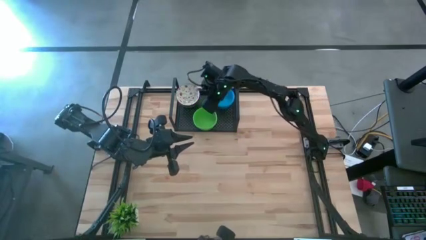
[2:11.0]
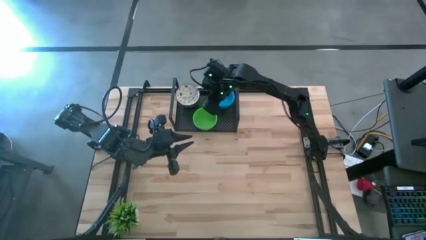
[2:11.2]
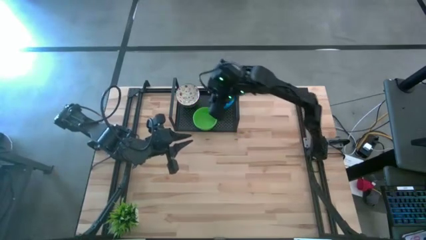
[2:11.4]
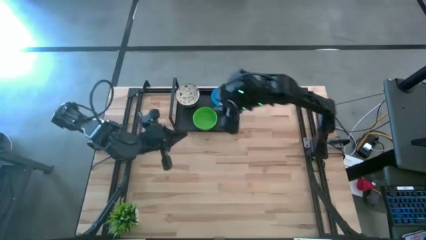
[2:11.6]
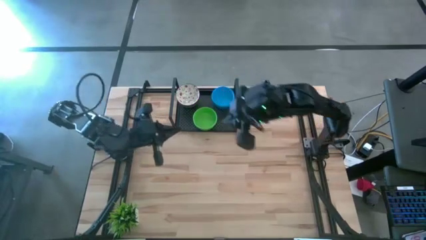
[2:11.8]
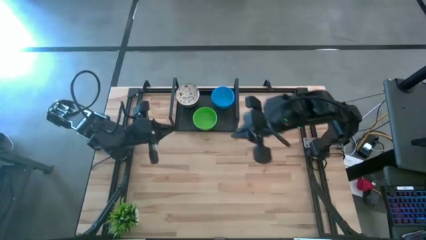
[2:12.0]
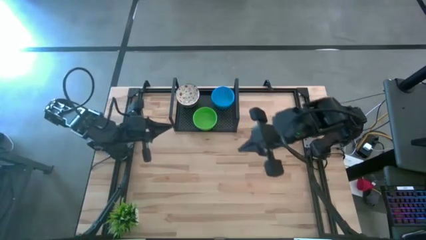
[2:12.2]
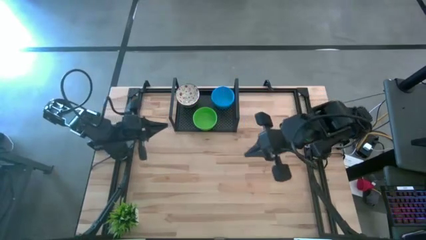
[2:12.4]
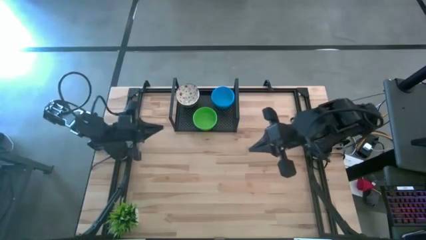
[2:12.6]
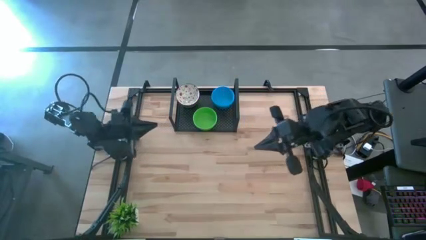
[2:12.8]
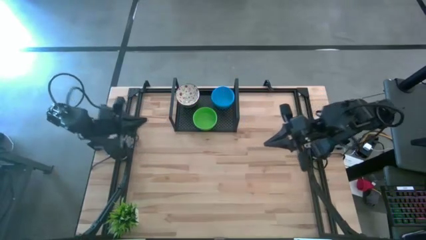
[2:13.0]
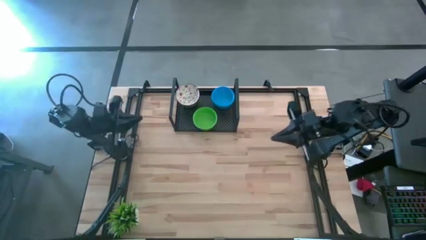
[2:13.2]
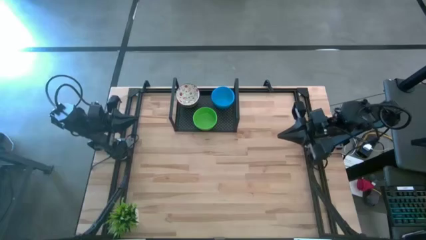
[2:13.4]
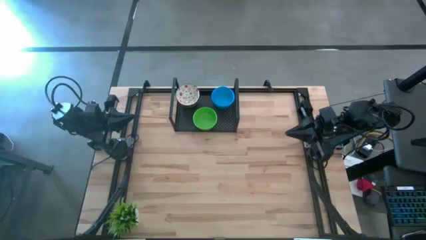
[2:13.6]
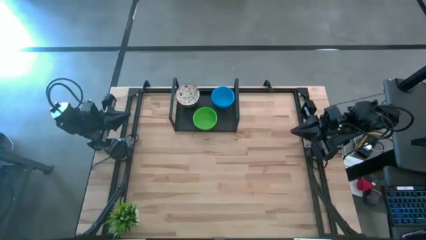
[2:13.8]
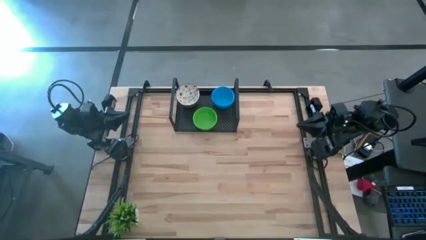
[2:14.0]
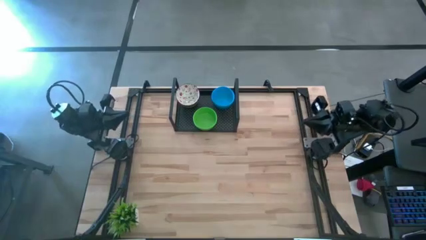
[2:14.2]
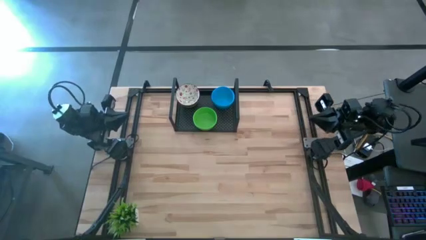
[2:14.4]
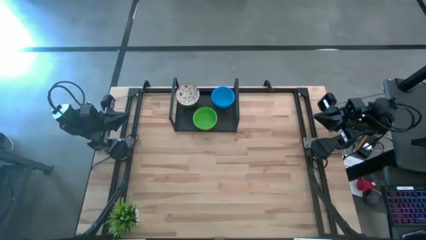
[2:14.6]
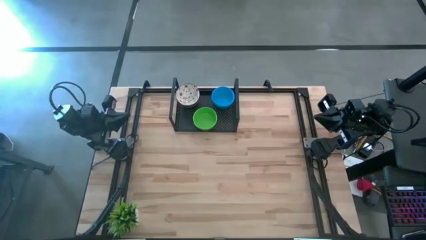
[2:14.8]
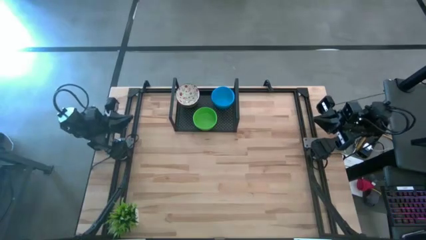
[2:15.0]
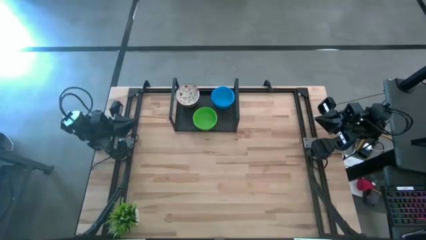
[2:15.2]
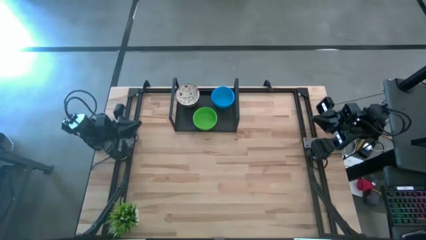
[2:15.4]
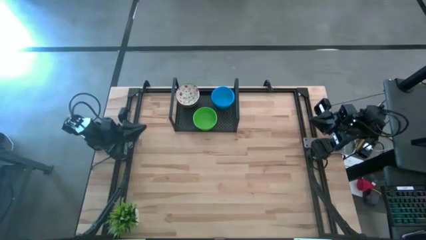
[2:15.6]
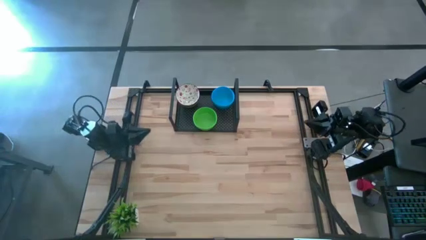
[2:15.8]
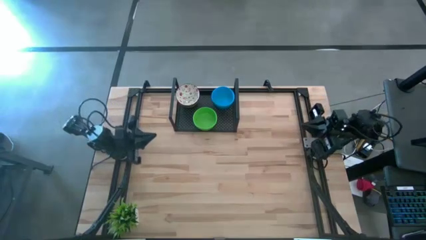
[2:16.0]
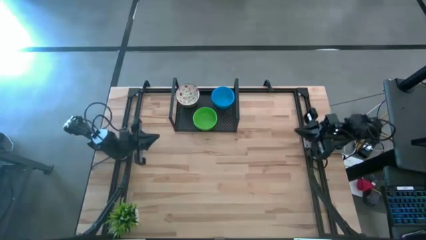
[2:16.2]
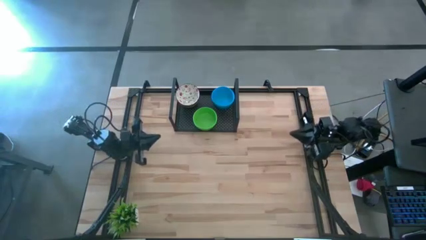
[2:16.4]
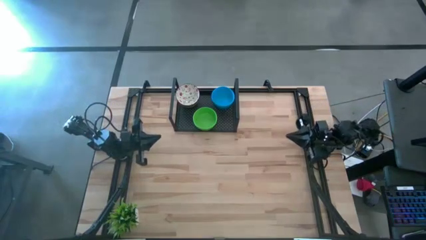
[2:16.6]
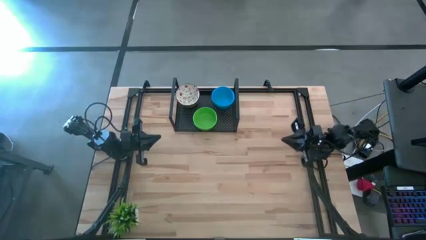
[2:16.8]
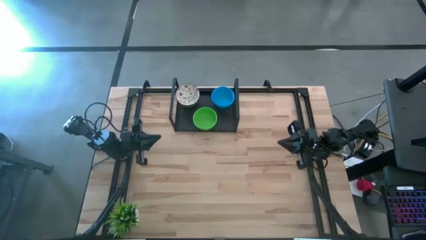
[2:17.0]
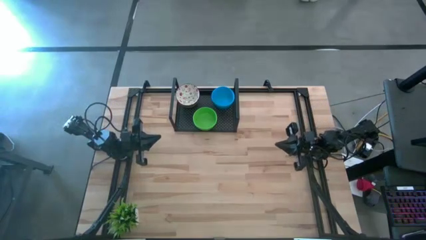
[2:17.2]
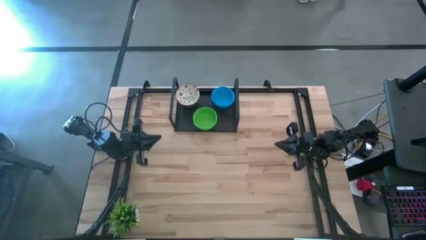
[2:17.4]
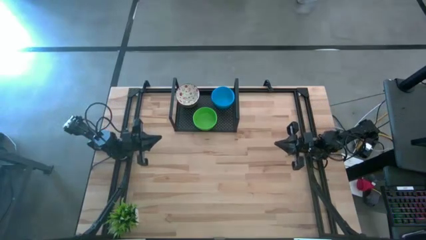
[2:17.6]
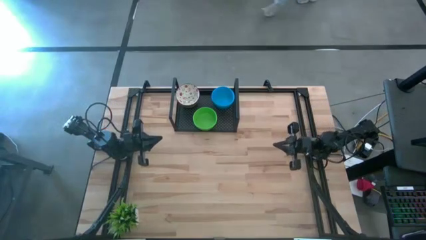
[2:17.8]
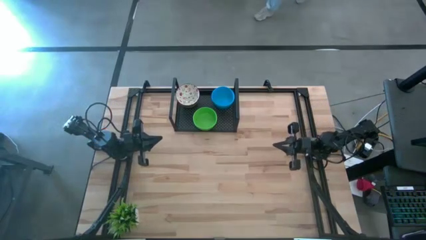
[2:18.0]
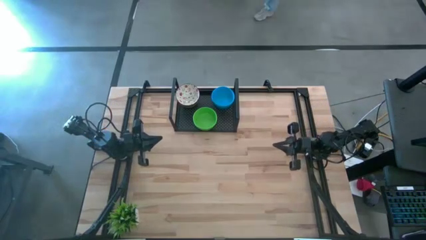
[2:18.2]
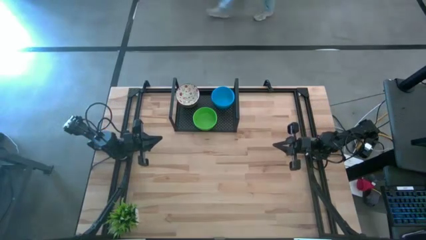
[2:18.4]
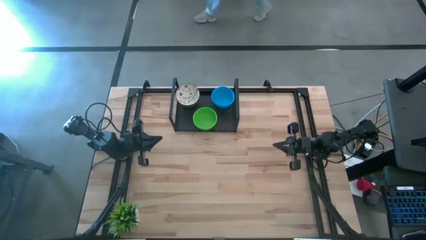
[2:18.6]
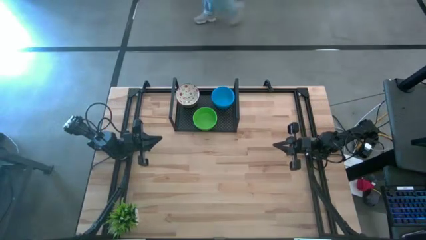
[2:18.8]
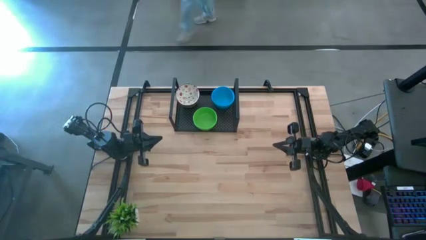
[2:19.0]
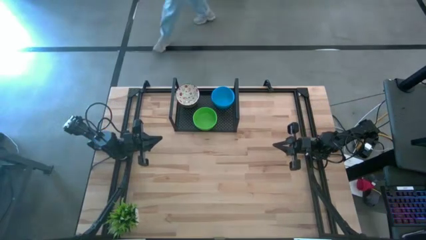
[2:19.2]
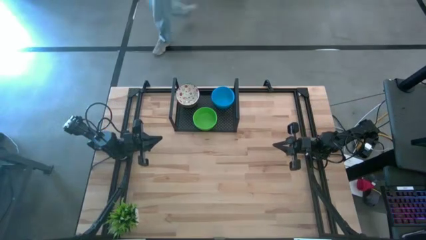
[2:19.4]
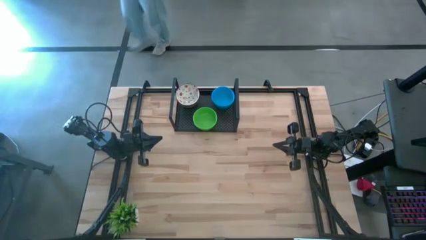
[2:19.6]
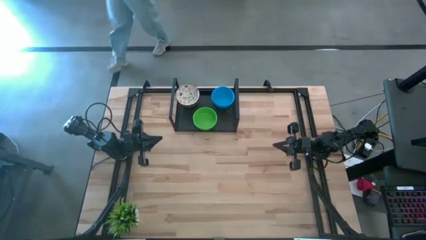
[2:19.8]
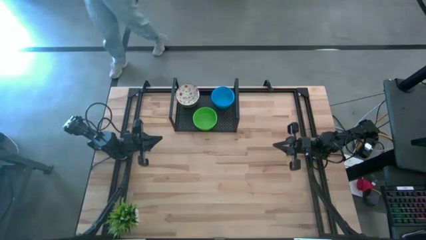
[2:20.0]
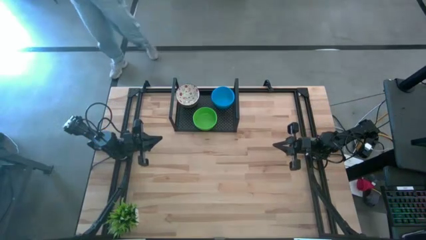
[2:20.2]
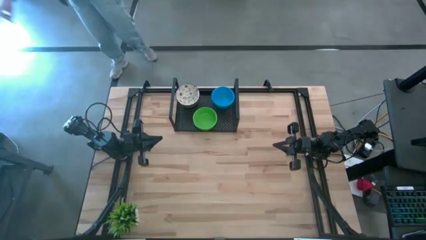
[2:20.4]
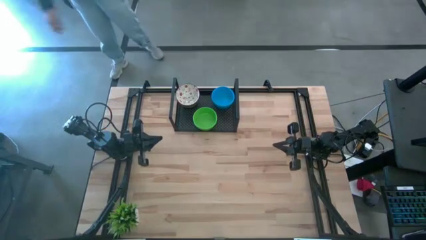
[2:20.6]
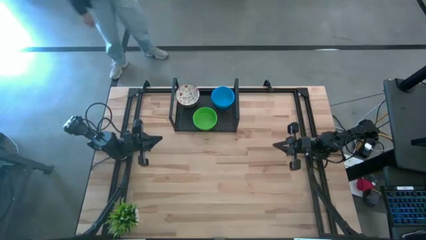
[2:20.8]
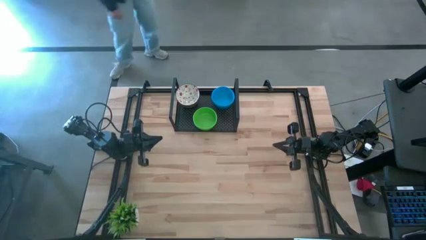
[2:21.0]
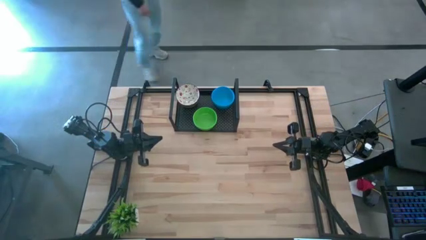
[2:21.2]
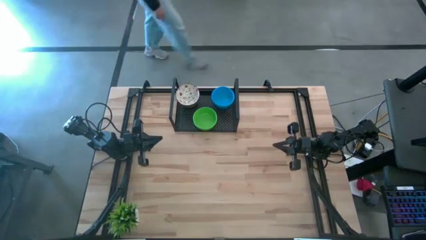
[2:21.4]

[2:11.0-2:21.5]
Task: Pick & Place Mini bowls
Return to Home Position

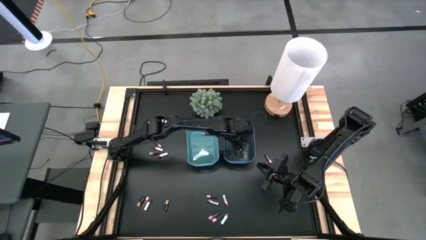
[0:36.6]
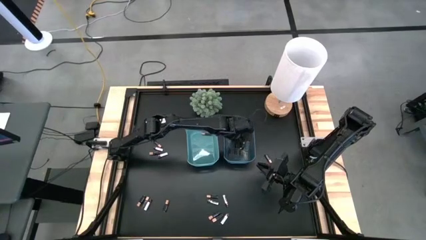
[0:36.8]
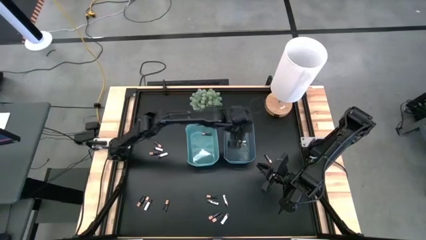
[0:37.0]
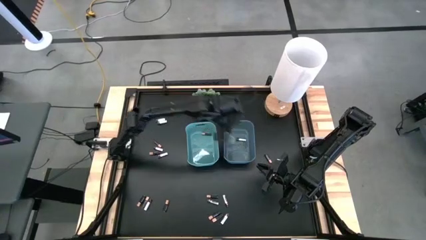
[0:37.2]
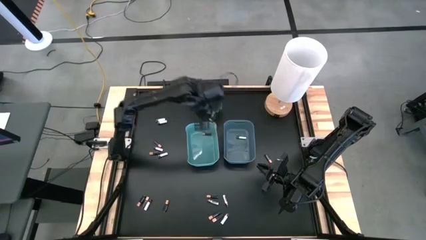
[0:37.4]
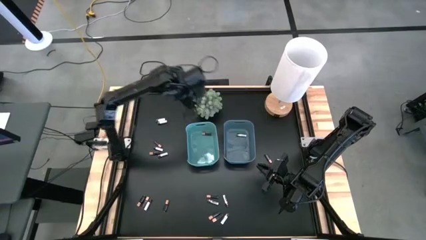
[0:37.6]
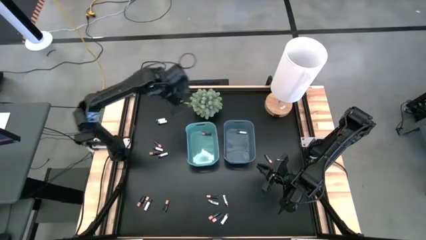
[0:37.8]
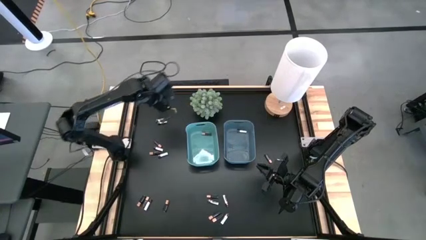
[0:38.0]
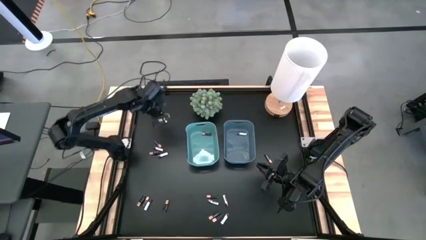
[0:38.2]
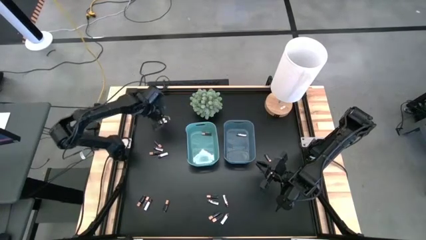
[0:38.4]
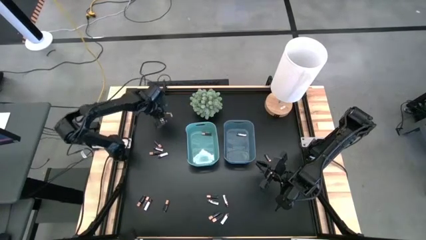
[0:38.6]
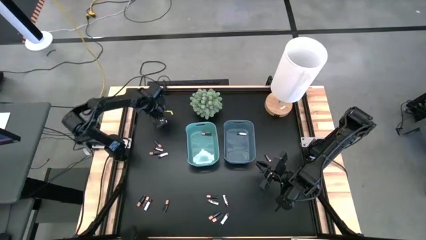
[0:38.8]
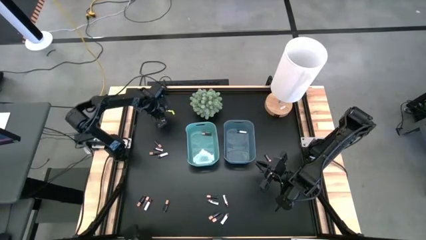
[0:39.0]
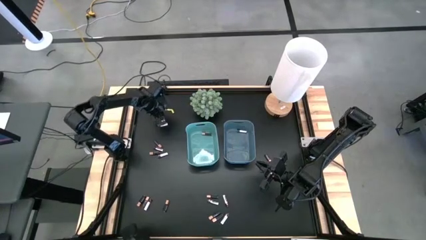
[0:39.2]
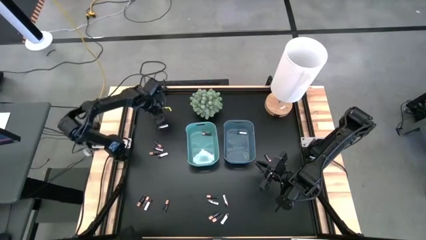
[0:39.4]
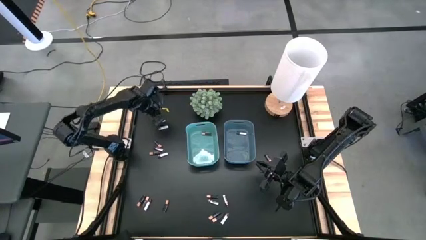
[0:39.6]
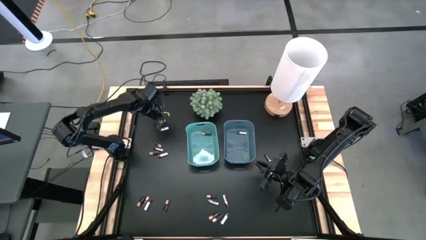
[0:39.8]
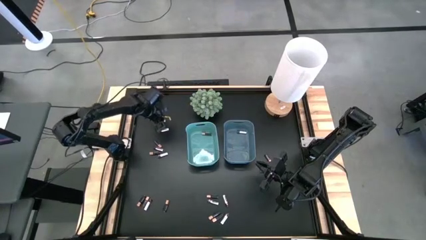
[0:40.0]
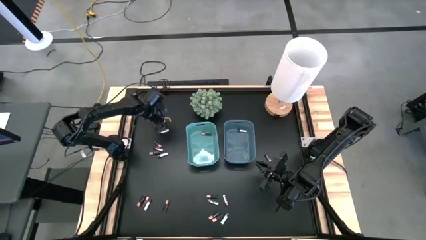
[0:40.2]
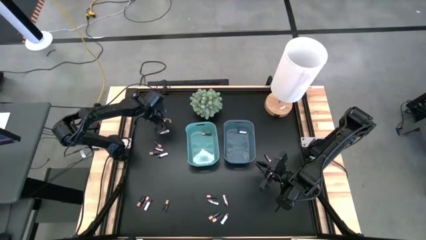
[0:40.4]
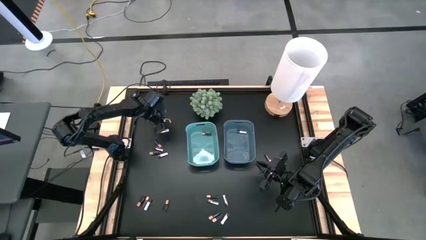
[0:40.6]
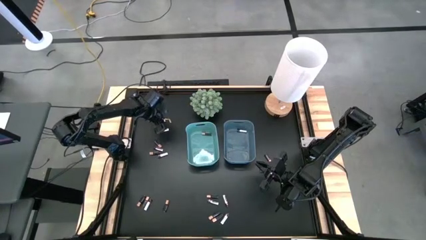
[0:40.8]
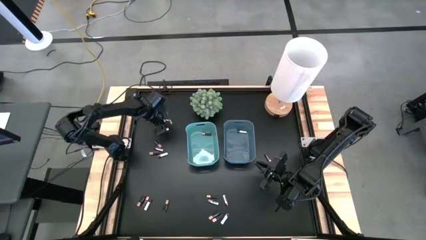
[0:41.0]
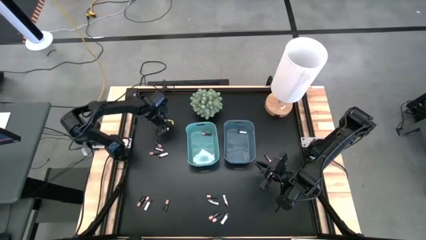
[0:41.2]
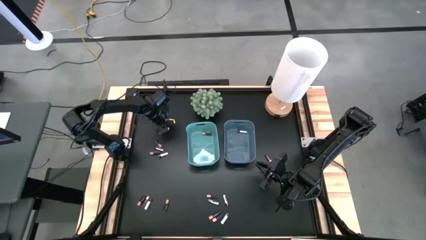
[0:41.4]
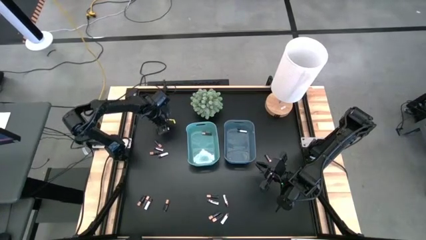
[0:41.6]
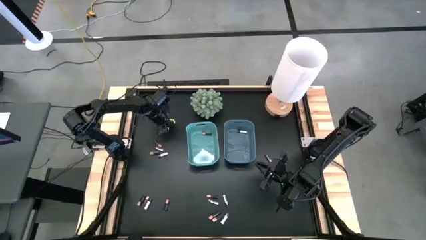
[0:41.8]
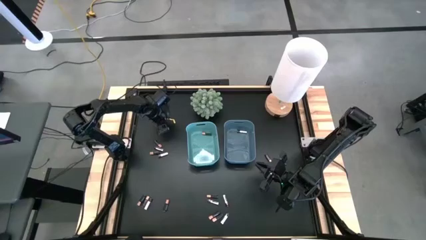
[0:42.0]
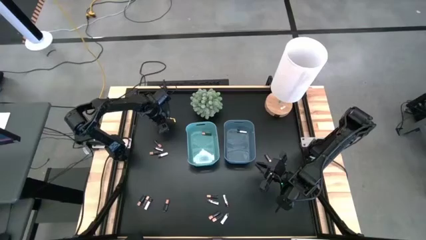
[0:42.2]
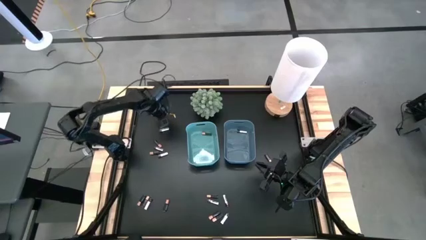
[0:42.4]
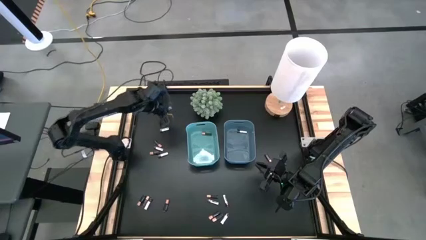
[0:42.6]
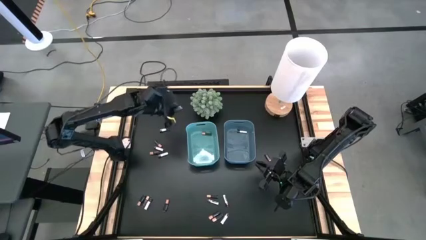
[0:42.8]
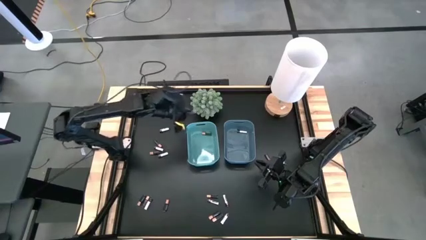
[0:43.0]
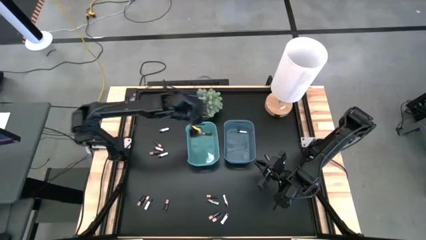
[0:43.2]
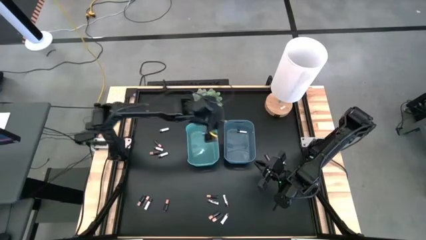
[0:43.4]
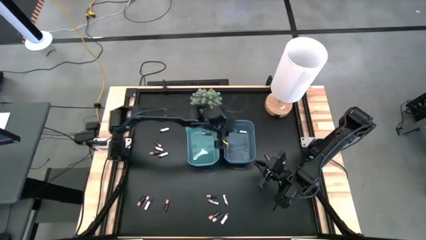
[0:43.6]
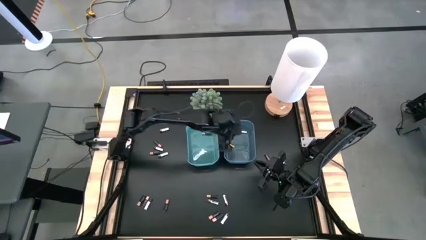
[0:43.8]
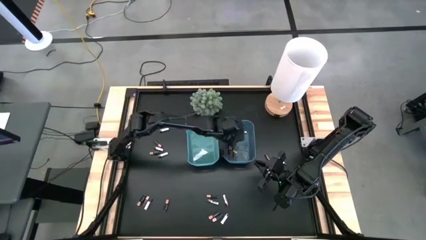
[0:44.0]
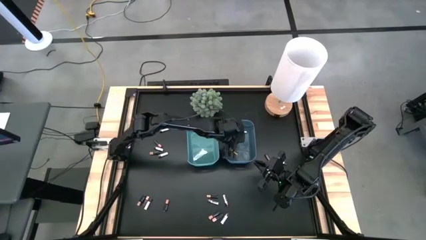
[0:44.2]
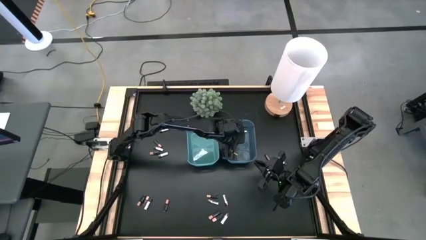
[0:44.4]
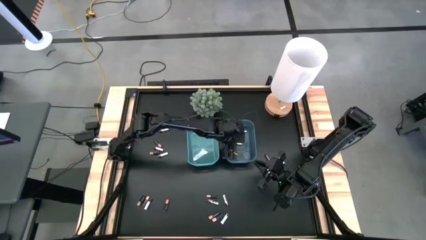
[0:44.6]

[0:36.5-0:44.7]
Task: Sort batteries
Put the white battery into the blue bin
